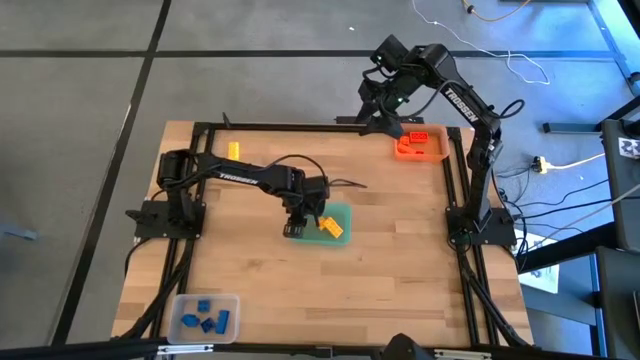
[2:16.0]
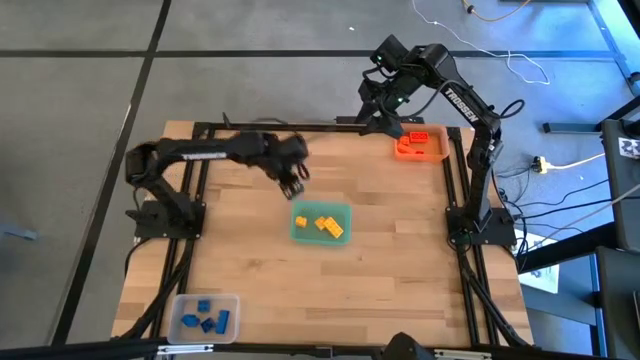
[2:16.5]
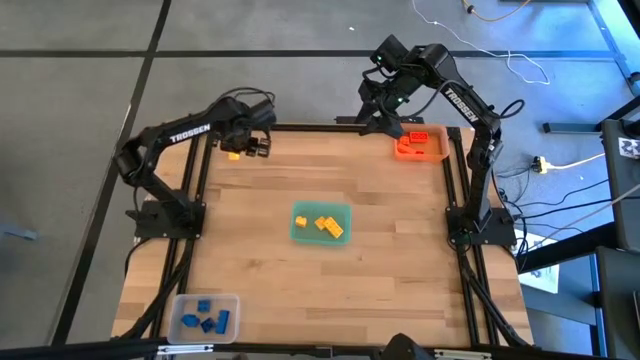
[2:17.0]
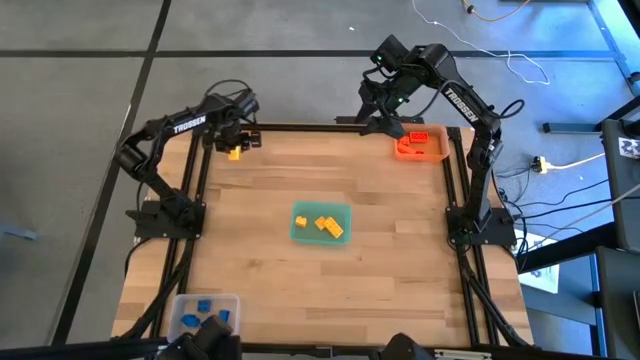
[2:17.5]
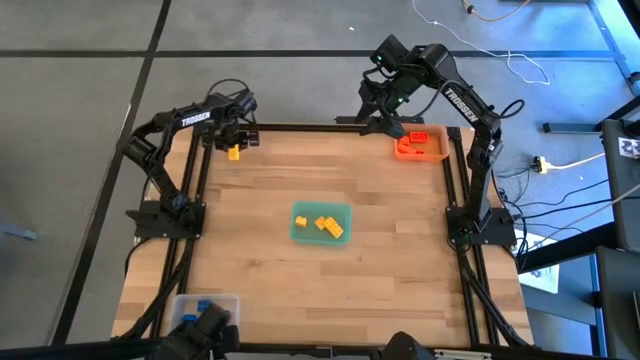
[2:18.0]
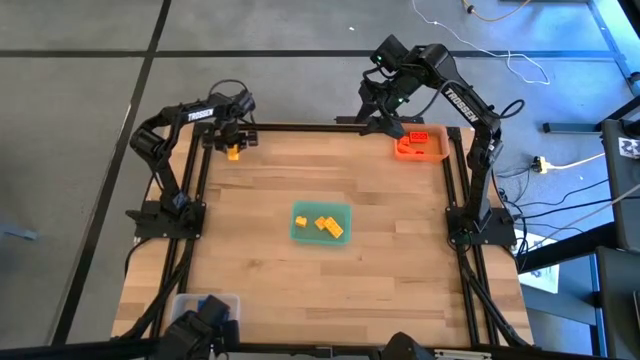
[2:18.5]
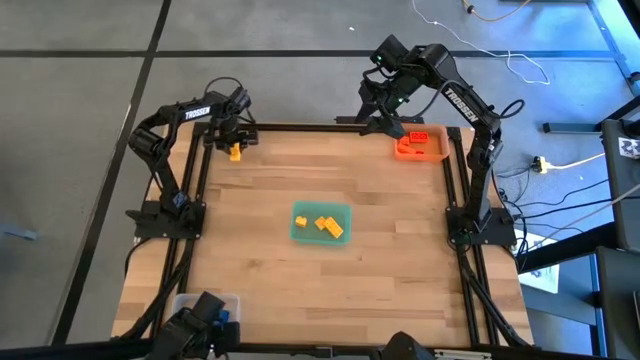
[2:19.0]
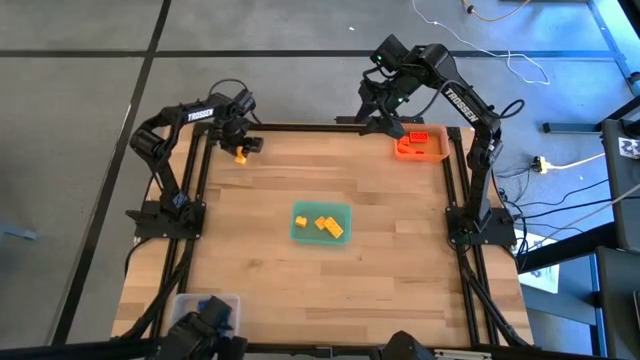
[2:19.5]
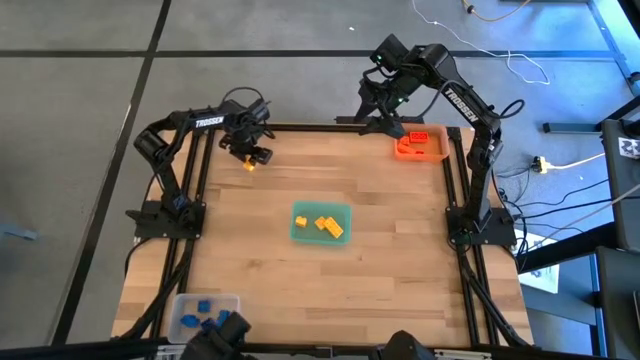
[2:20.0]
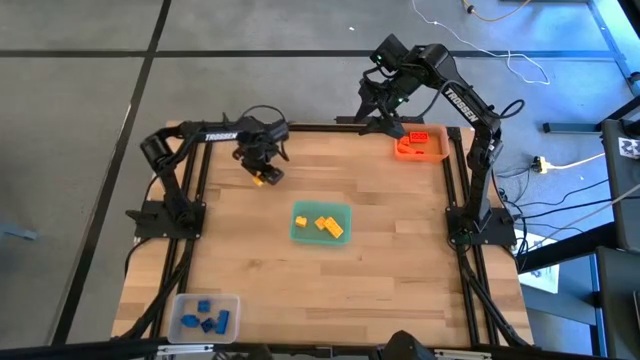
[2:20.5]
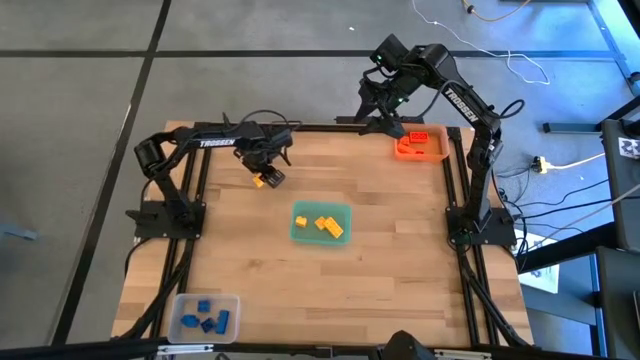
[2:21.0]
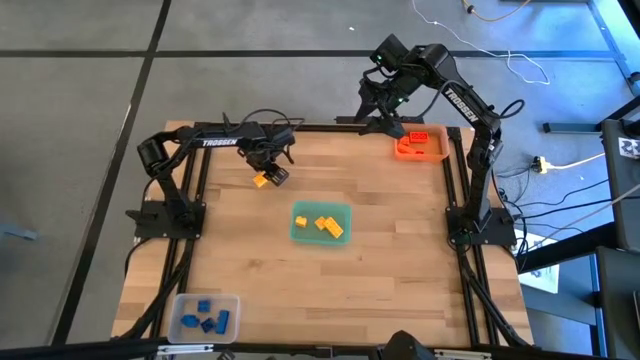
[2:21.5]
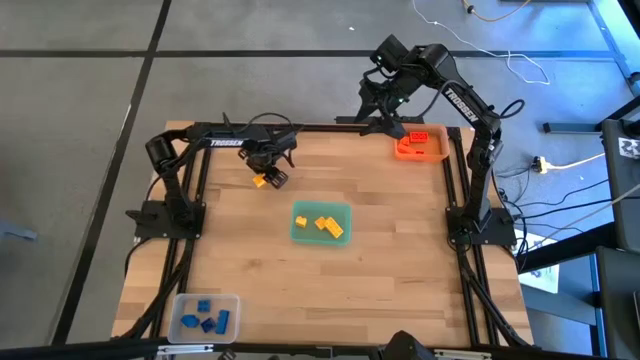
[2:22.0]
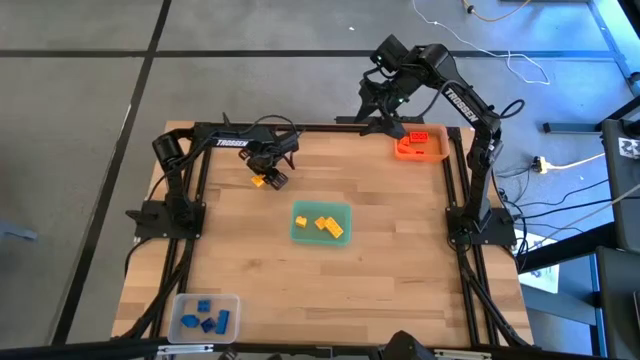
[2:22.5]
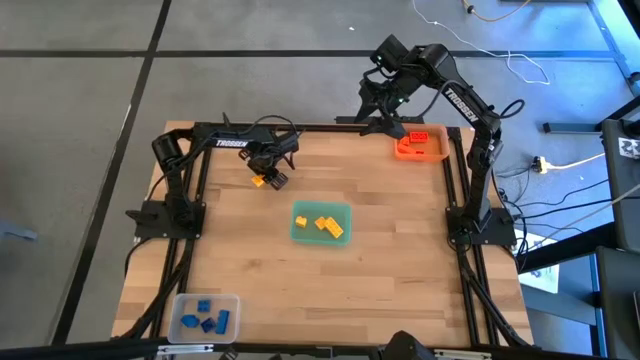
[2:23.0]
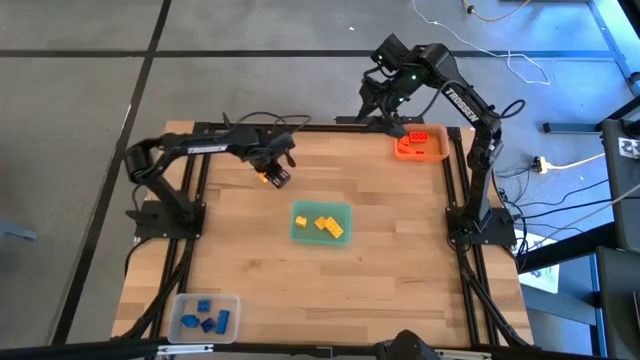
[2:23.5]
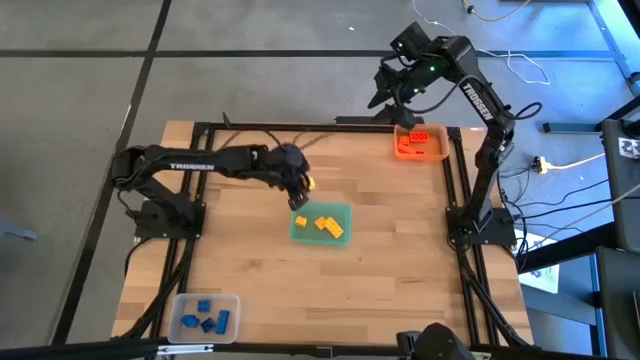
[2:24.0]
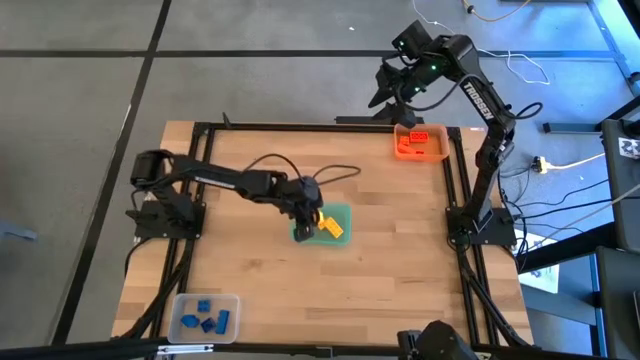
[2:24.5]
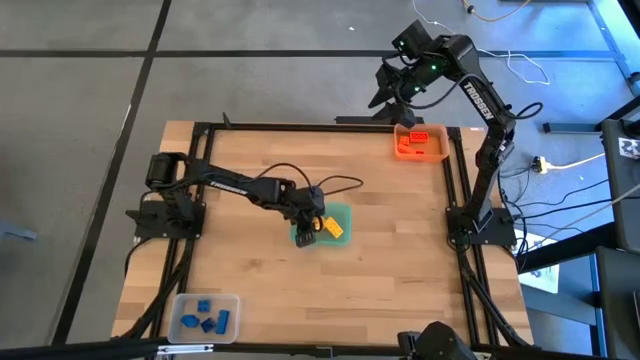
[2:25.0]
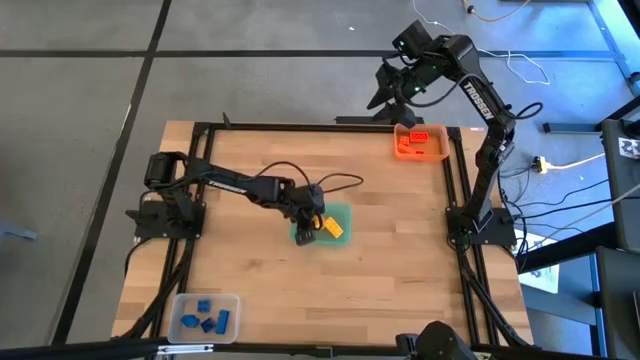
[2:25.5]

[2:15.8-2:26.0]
Task: Sort & place blocks by color
Put the yellow game piece into the blue bin

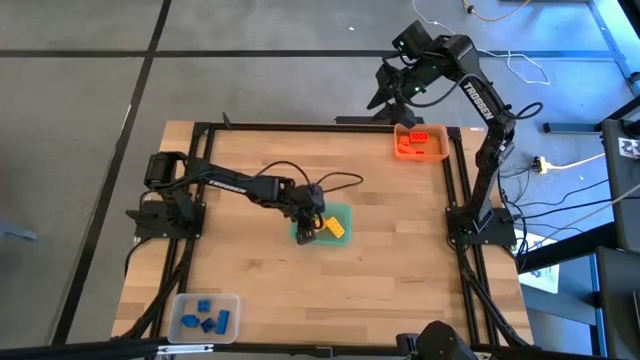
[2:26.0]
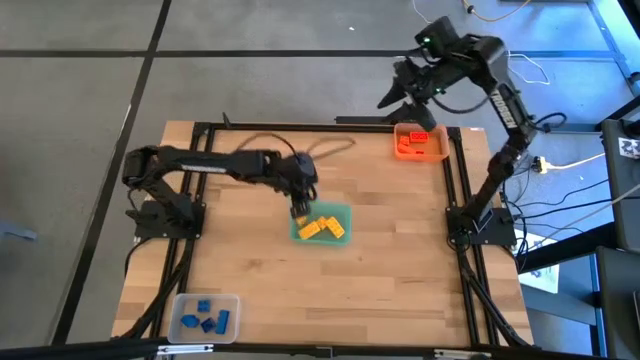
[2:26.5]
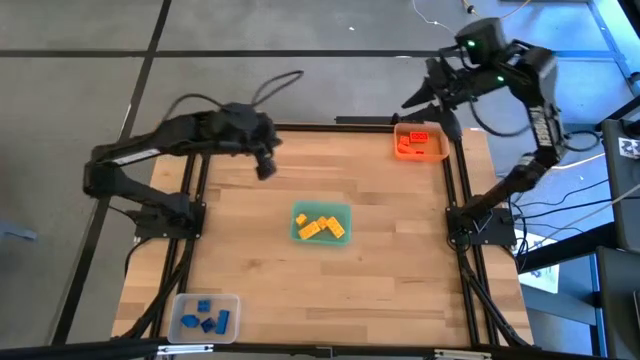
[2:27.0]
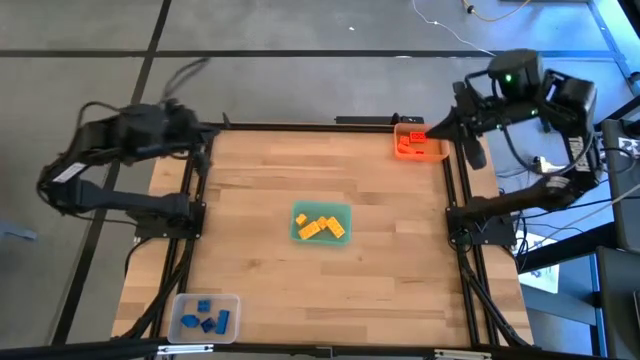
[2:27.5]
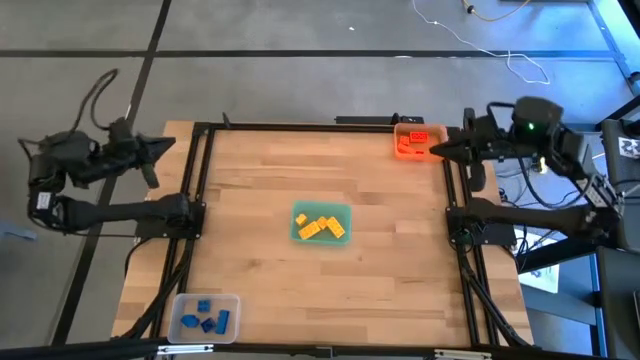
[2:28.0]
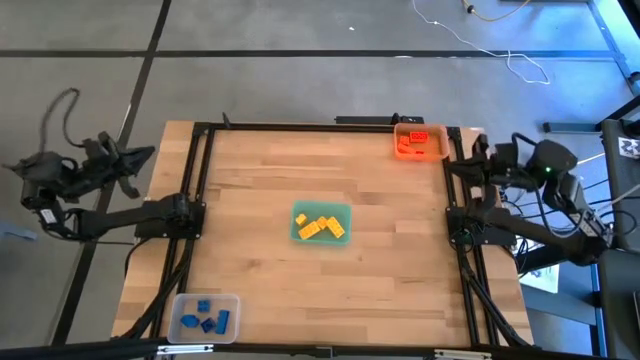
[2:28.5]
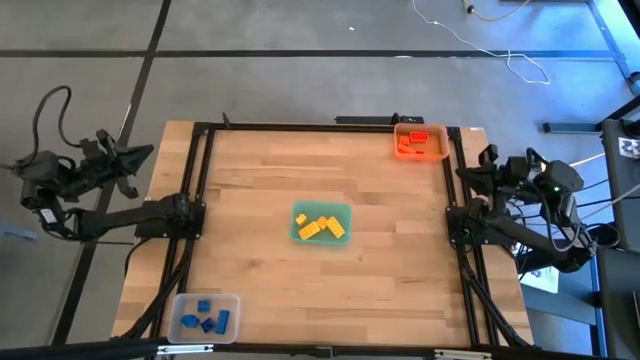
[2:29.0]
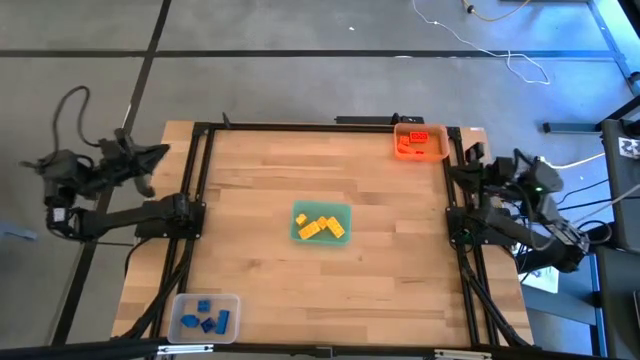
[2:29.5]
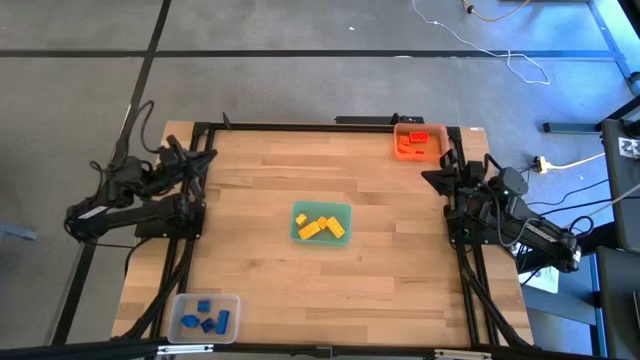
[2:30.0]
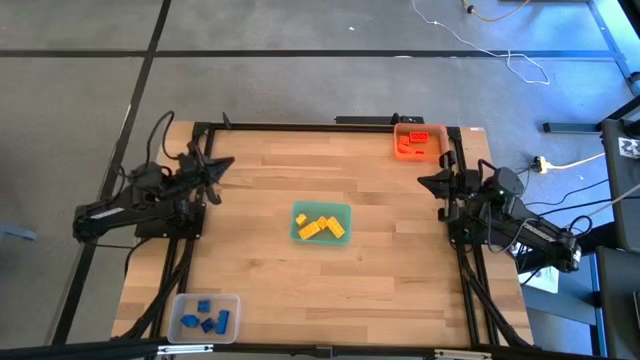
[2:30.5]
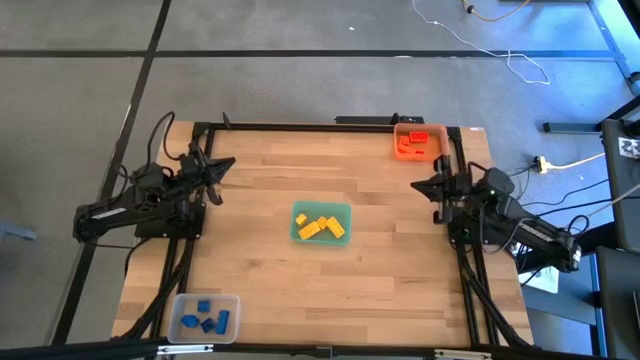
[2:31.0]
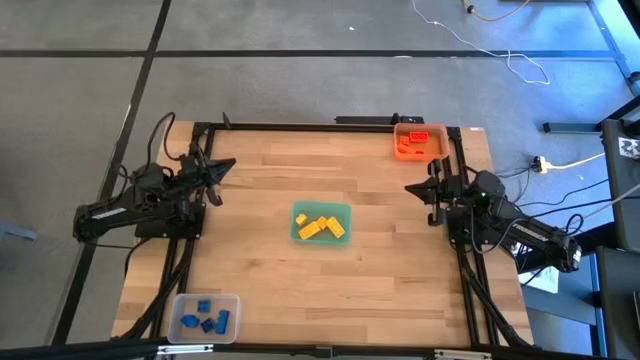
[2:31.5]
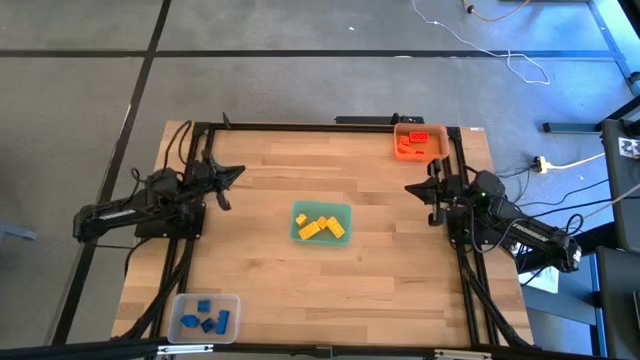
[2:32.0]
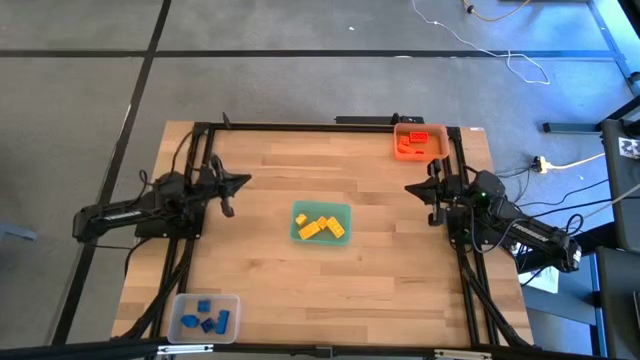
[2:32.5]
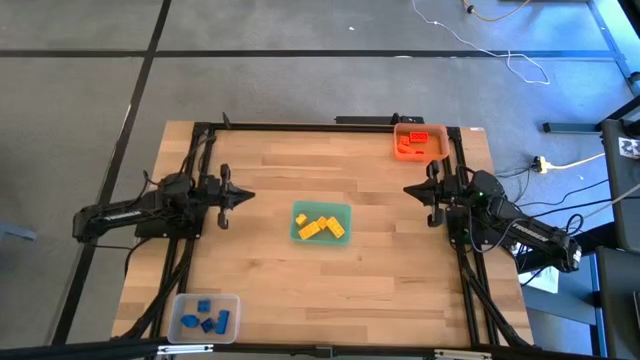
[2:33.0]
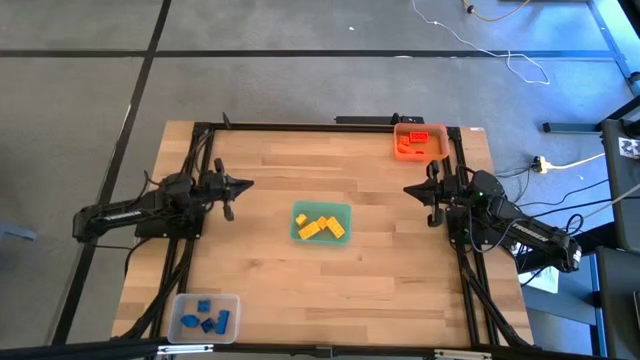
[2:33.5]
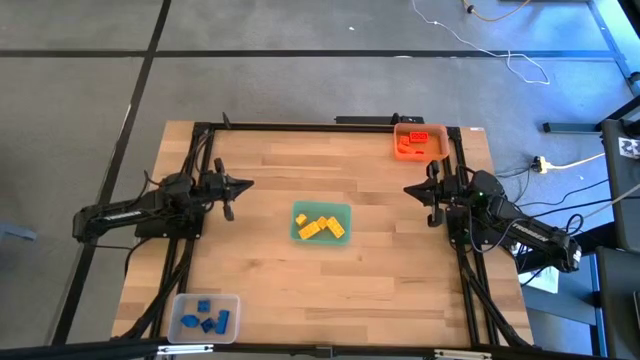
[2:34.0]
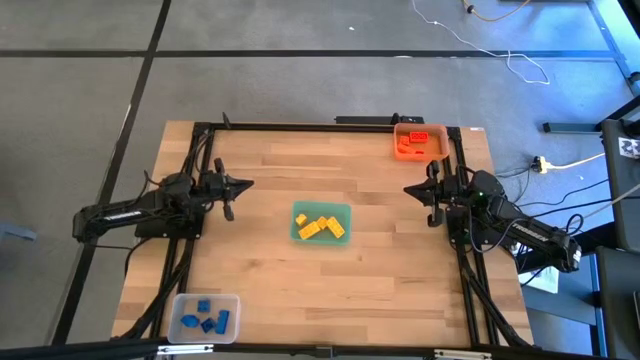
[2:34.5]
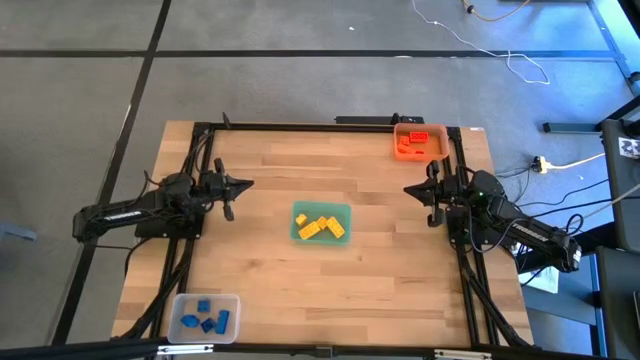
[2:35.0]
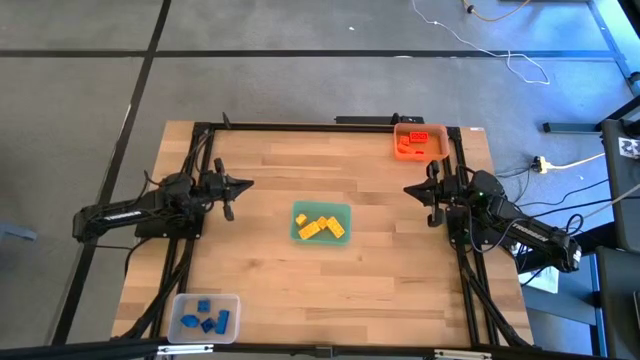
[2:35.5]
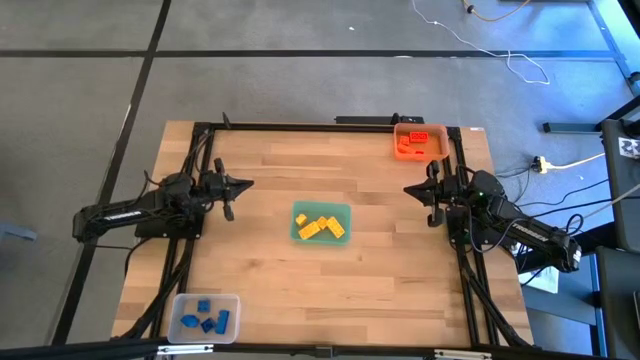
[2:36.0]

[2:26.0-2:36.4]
Return to Home Position
